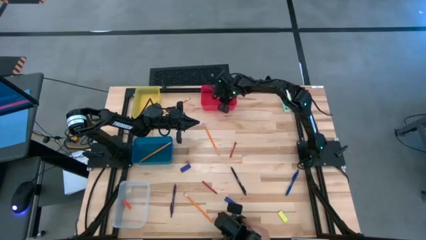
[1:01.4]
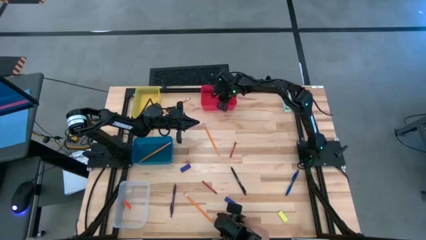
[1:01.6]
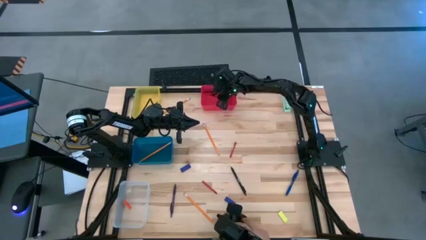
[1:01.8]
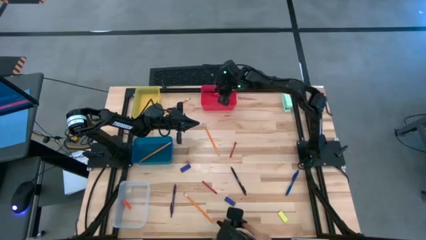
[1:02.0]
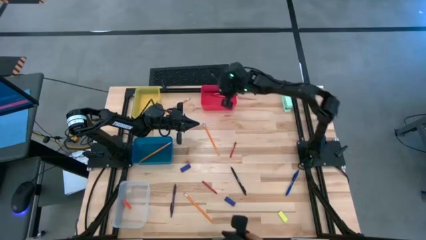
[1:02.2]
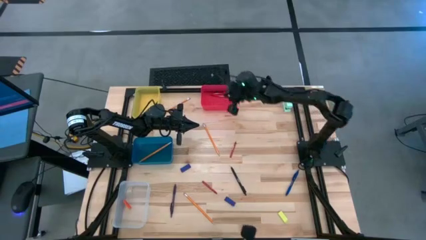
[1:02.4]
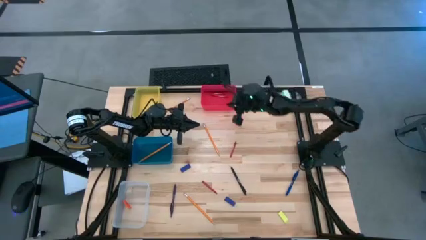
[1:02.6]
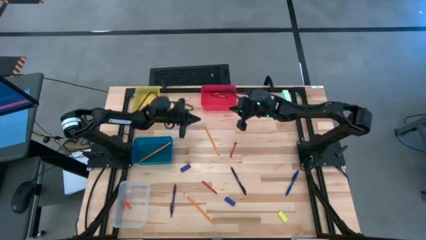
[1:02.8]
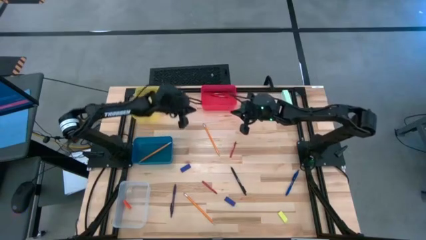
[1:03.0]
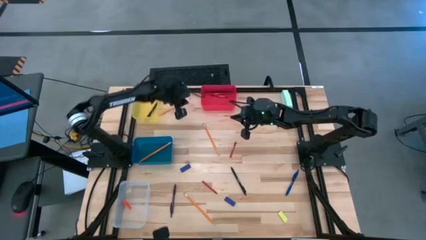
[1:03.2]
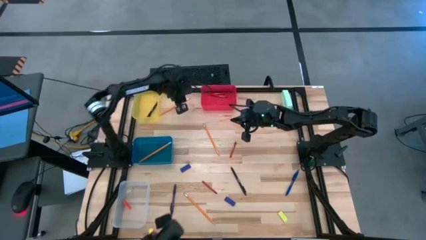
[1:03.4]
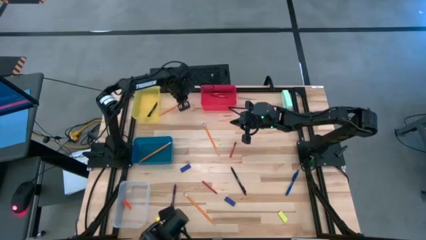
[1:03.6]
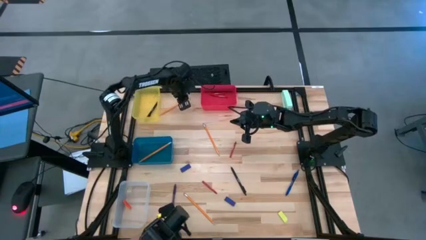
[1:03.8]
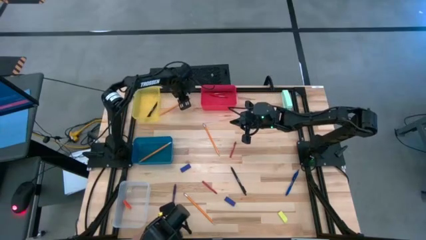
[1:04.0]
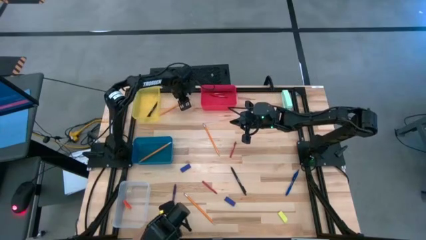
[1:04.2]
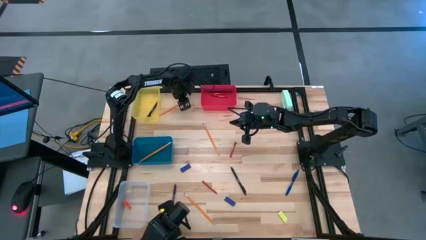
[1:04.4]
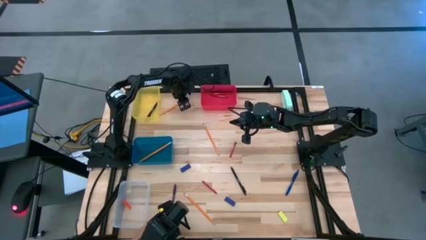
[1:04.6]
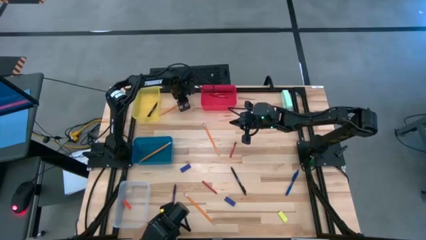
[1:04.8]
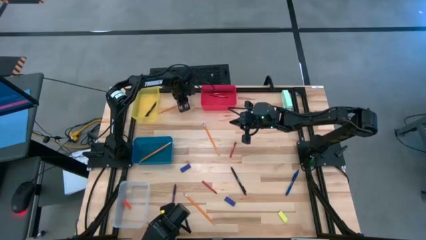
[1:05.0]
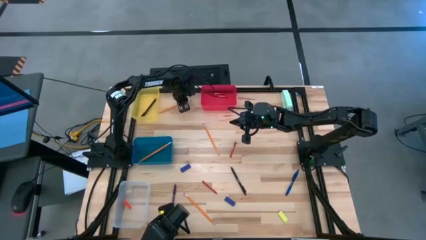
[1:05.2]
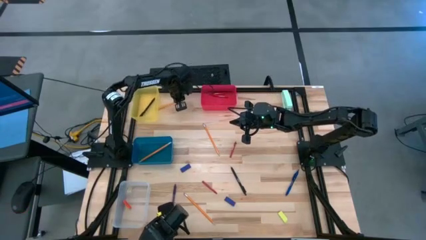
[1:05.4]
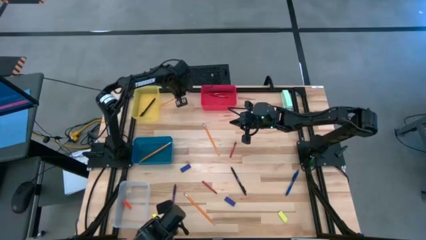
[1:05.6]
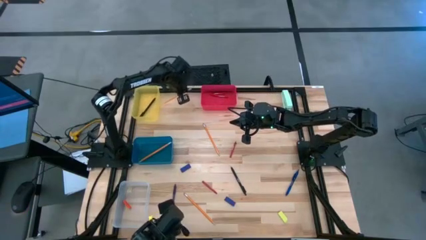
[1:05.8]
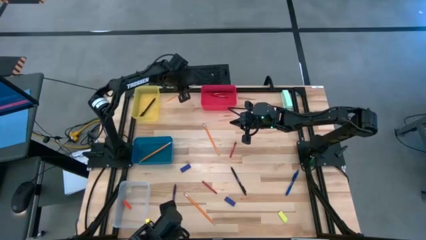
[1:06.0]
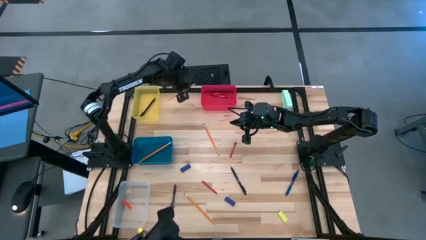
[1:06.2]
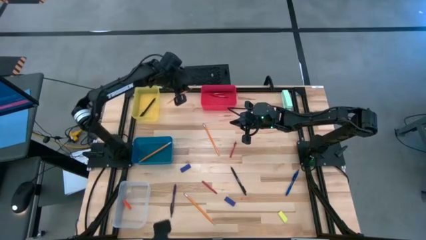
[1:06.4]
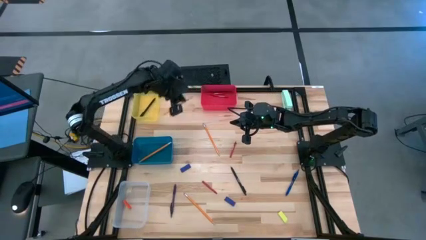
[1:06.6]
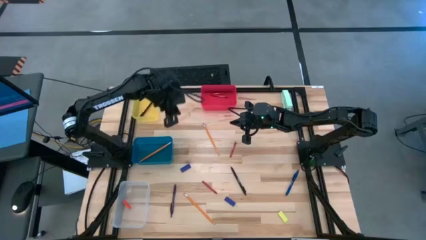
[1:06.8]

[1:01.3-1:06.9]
Task: Sort crayons/erasers/pens/pencils in bins
Put the yellow pencil into the blue bin

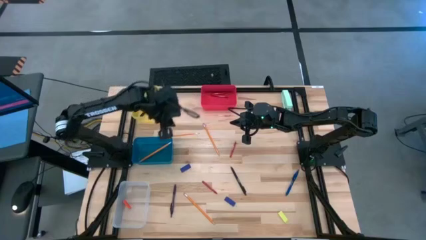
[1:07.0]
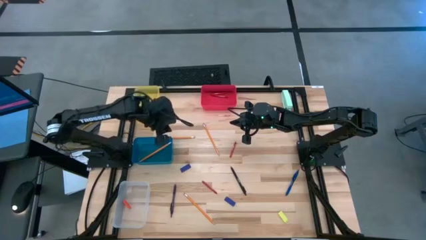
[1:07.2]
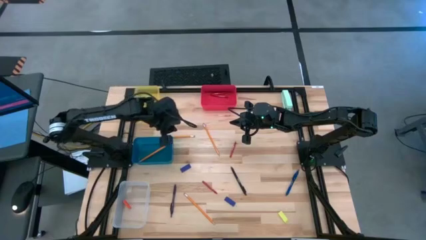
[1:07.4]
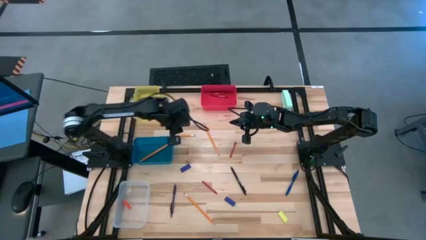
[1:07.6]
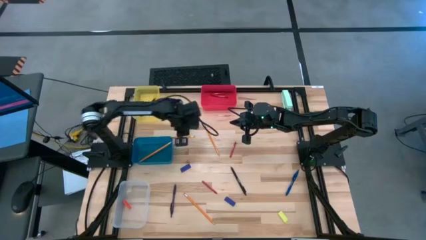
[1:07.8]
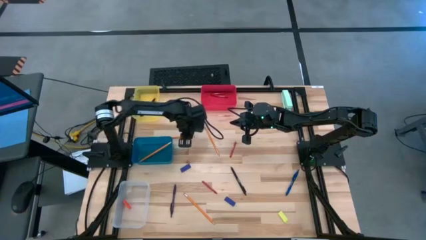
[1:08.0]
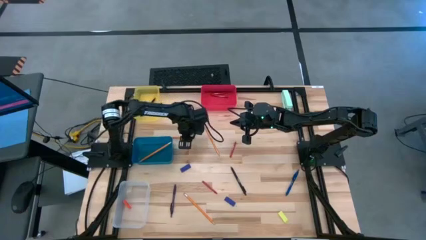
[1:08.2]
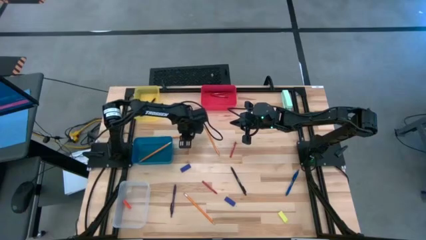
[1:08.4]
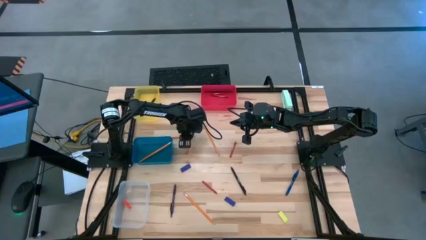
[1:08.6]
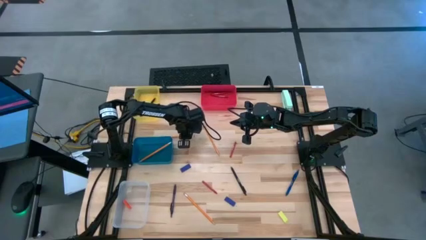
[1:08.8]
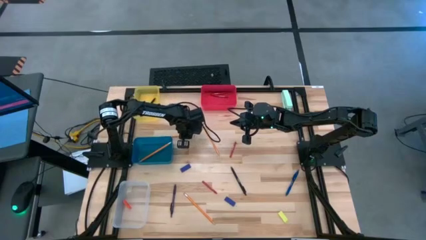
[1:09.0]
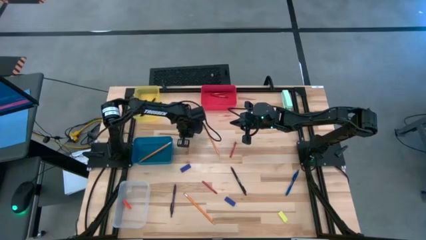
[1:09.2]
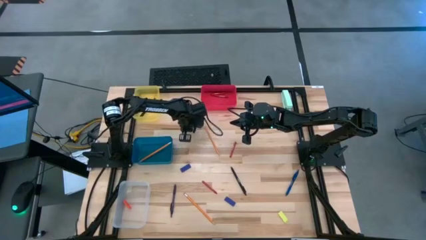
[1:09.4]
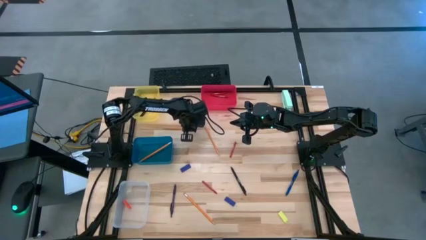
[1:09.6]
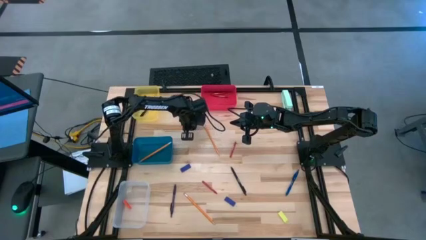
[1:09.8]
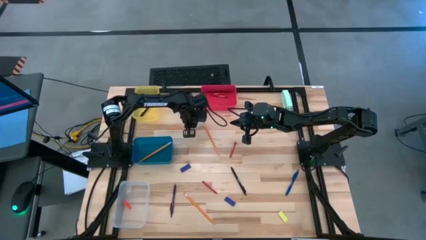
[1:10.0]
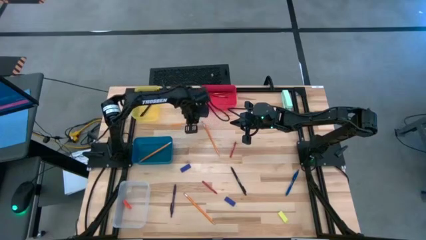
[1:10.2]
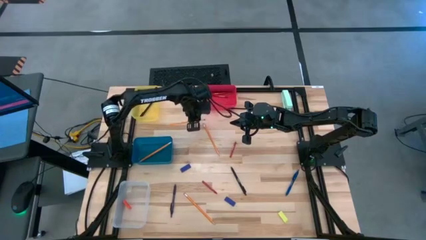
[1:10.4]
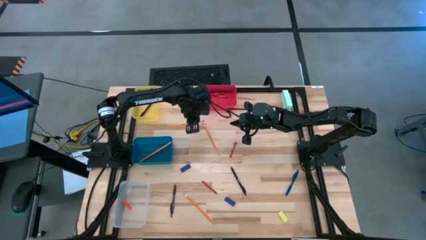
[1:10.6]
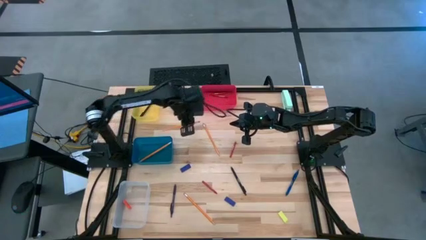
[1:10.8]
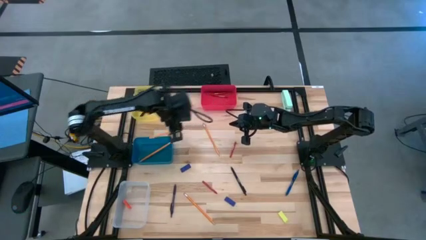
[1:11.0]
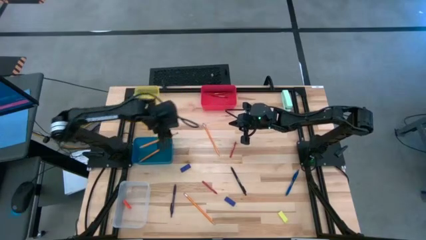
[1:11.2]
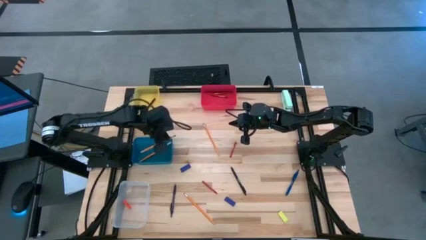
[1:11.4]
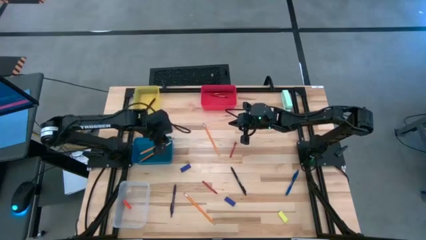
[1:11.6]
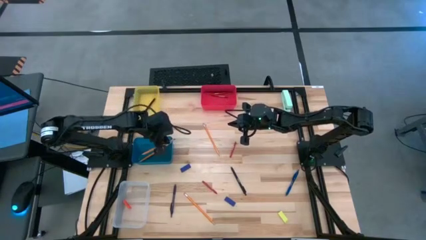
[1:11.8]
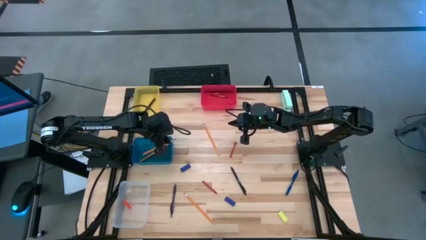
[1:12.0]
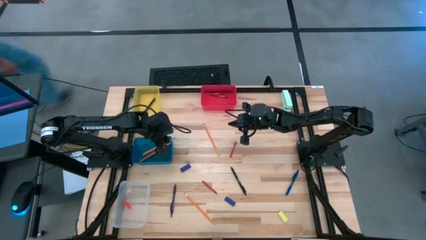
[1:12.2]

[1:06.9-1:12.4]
Put the yellow pencil into the blue bin

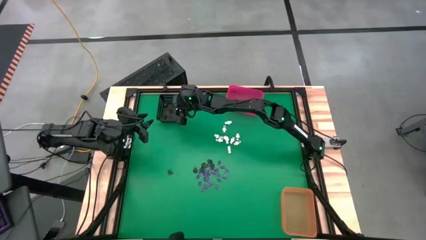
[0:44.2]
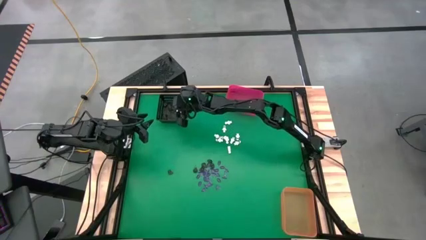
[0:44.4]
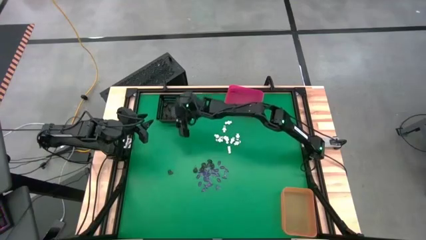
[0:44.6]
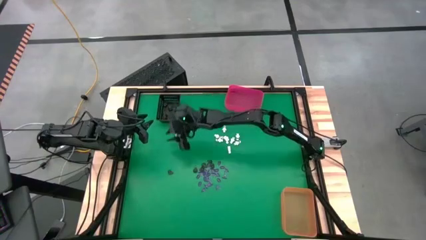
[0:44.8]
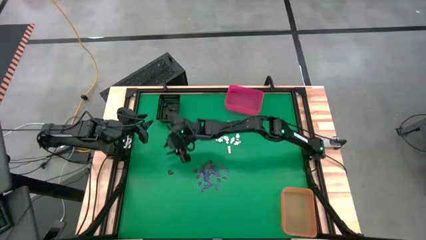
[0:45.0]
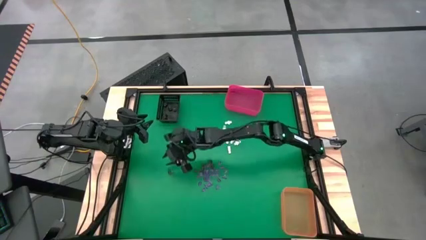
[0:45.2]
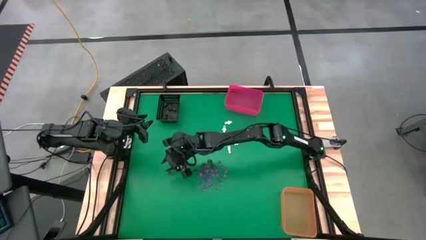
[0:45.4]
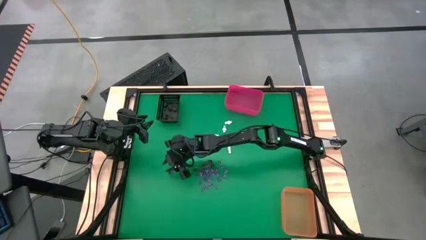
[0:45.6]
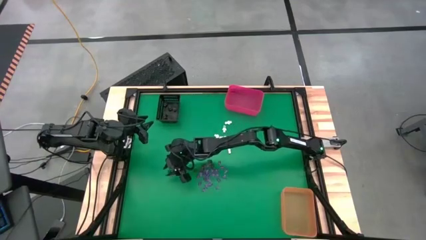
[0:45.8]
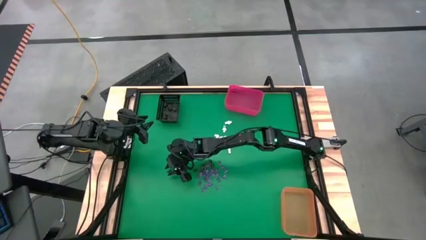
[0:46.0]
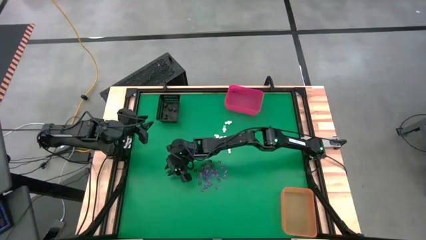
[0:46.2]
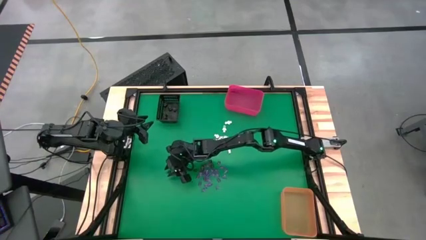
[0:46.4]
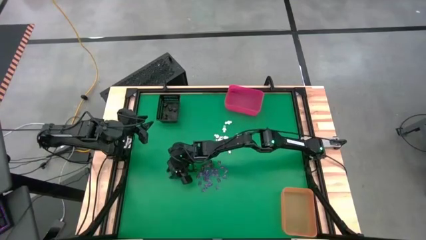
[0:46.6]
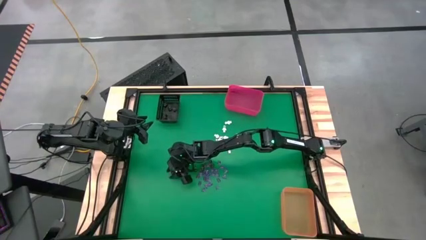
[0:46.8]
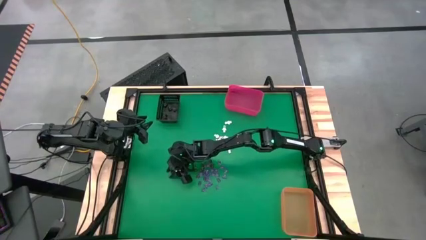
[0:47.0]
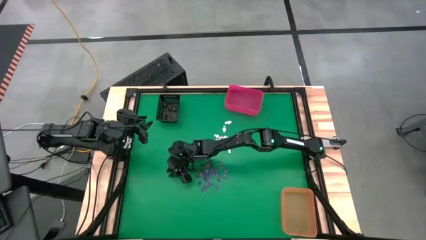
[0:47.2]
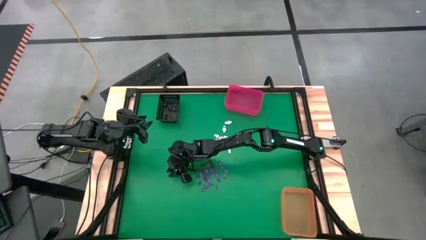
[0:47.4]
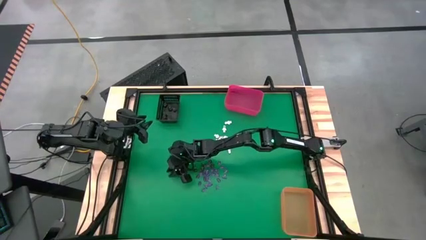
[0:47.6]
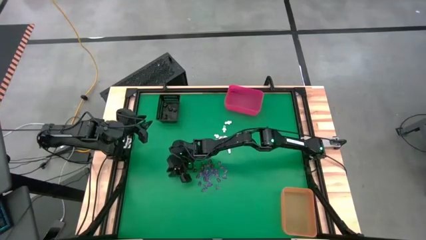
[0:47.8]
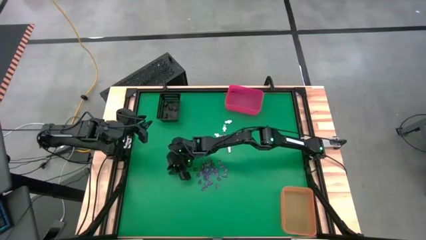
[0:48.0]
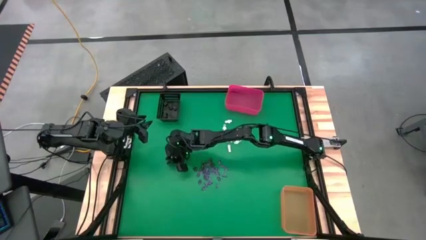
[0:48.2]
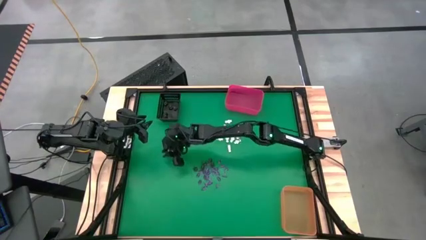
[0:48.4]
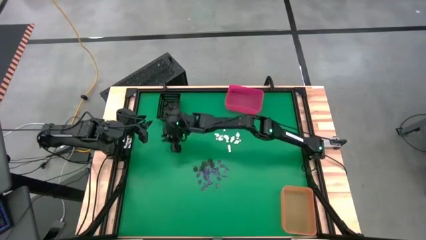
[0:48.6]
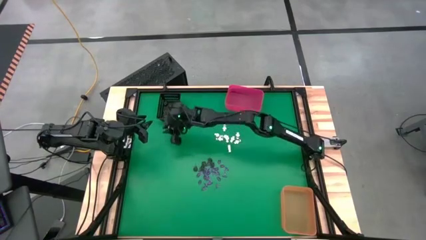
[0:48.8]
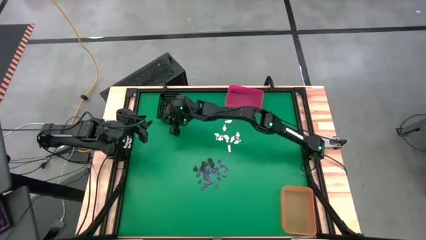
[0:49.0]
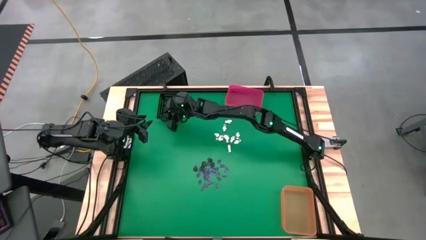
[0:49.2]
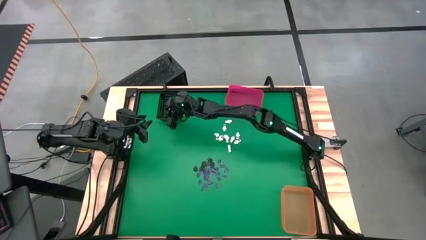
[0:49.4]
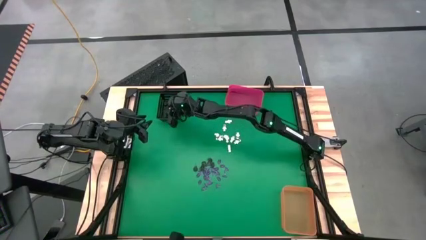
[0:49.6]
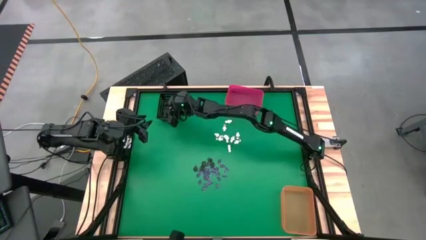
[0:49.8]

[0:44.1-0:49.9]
Task: Sort Halloween decoration
Put the brown skull toy into the black bin
